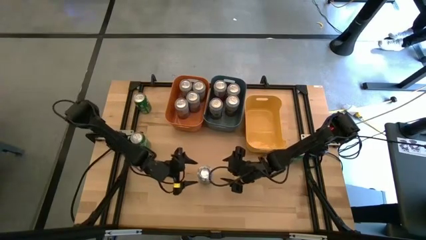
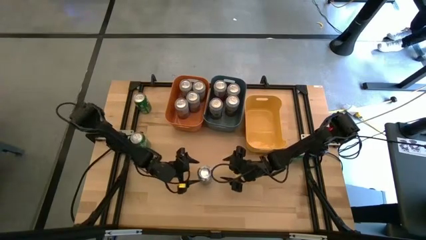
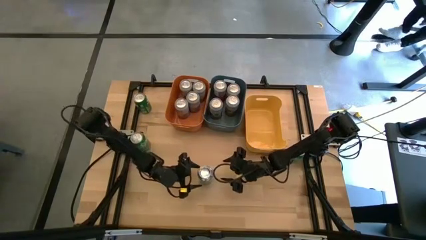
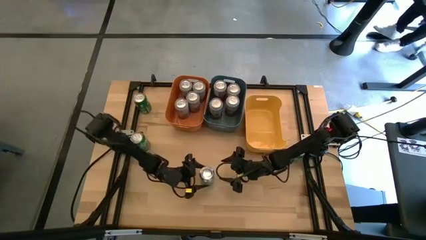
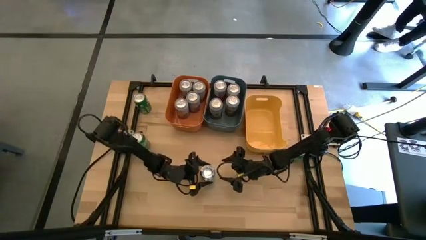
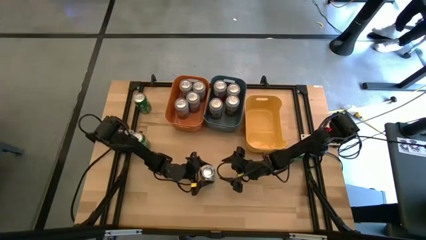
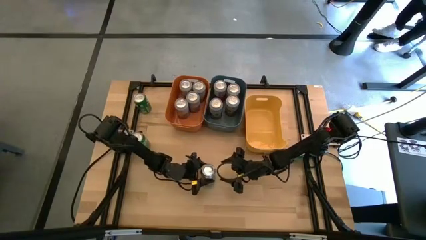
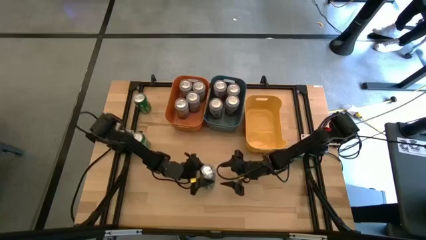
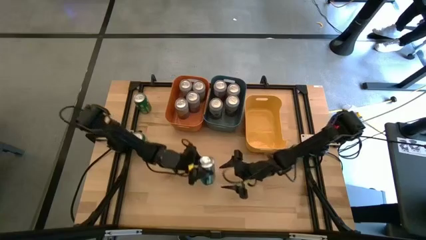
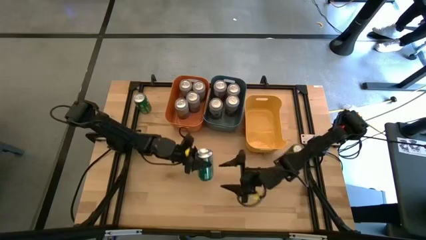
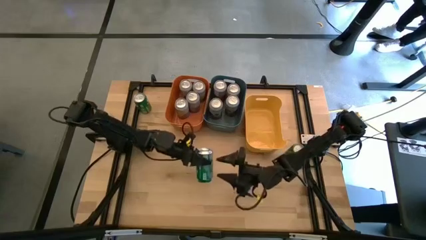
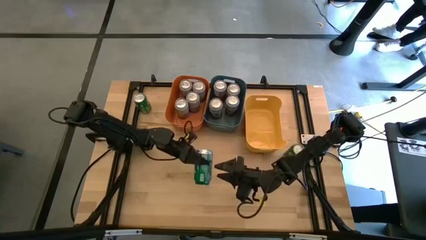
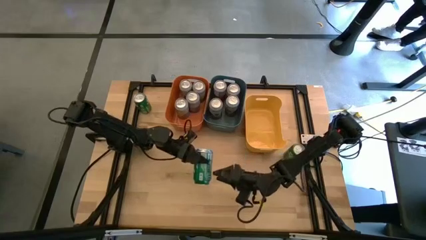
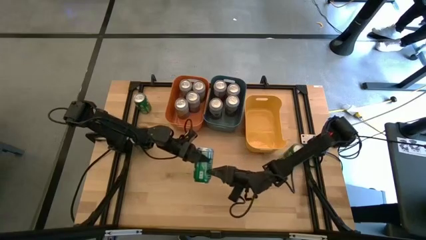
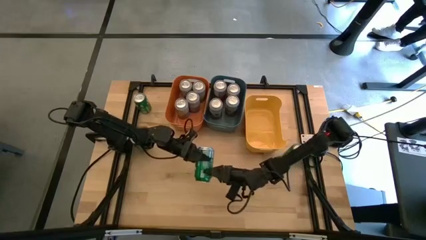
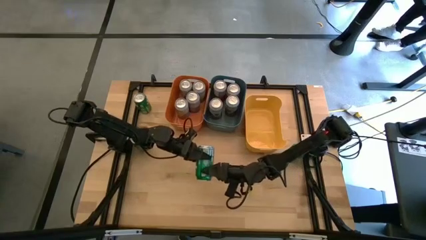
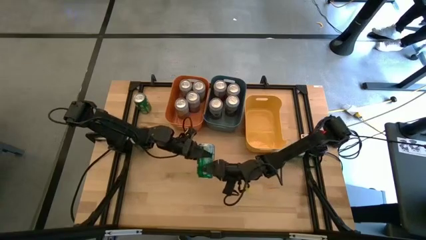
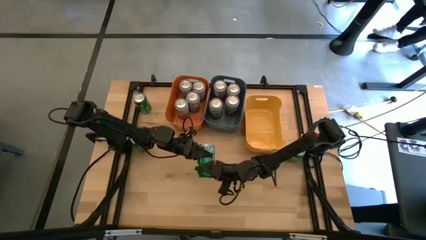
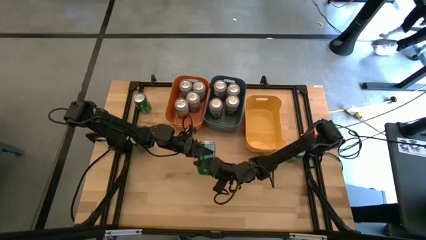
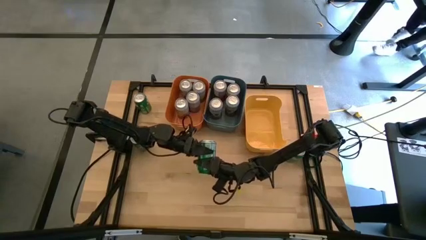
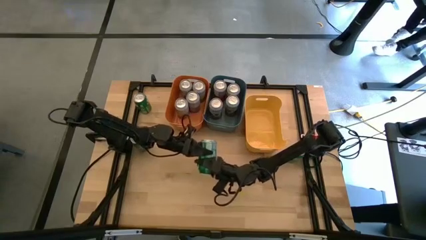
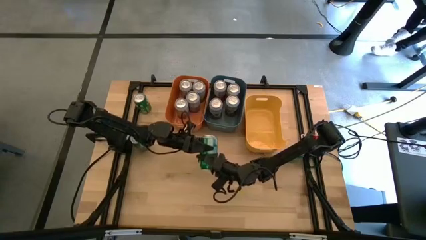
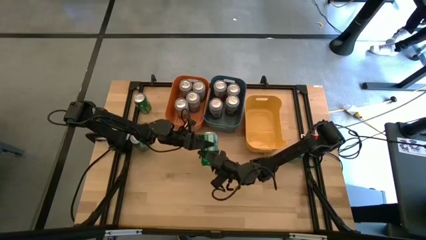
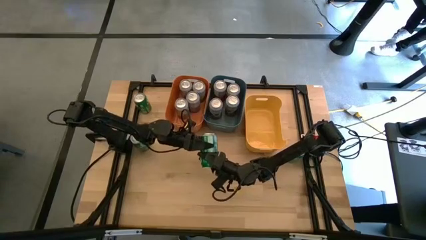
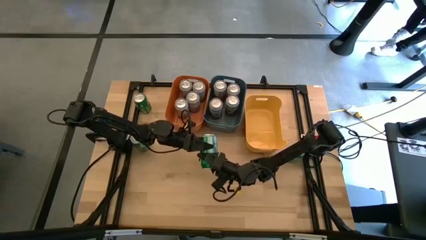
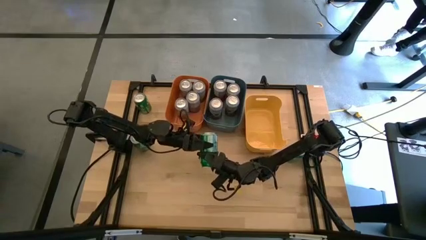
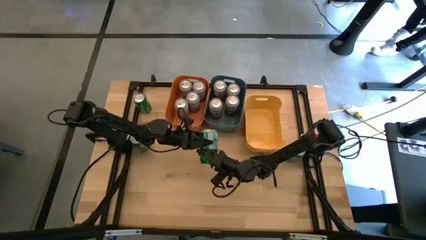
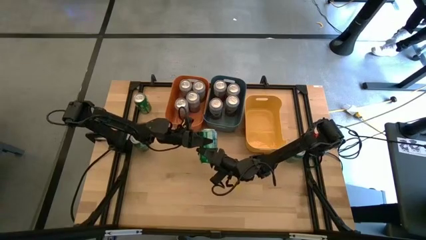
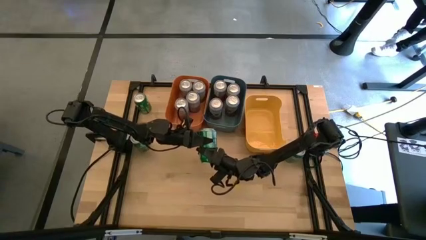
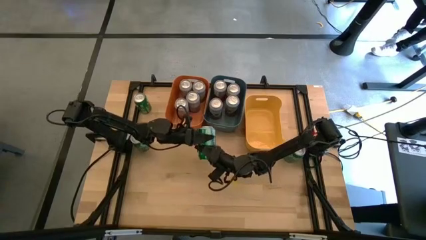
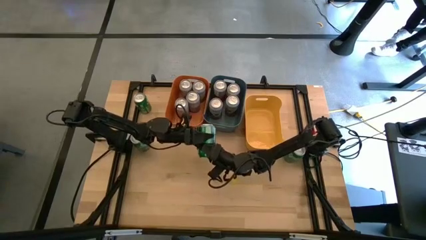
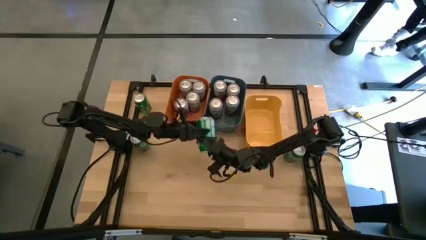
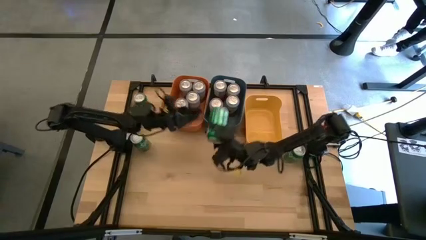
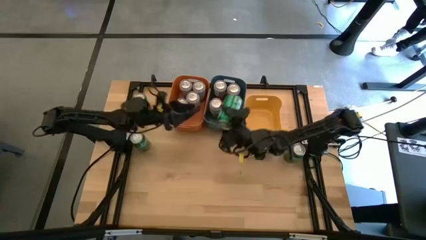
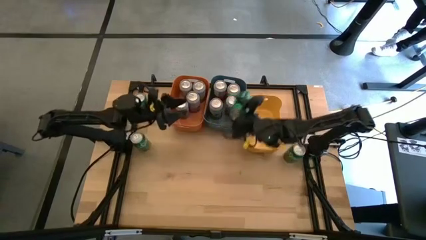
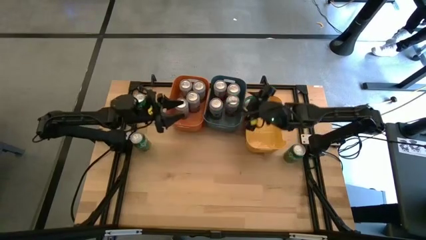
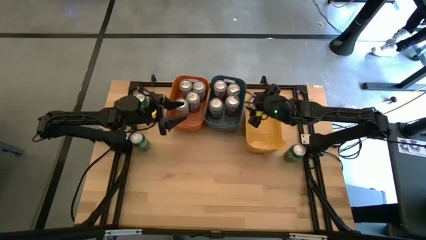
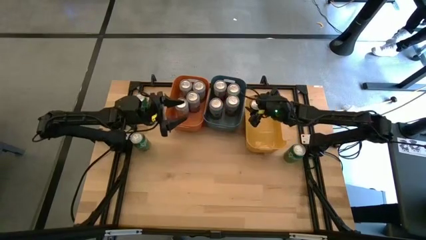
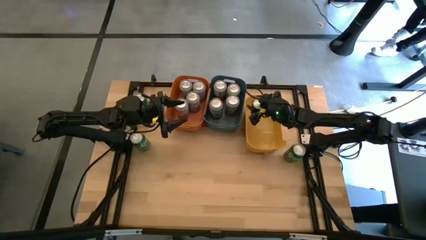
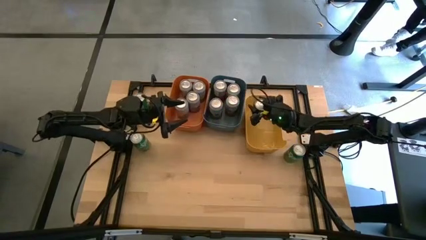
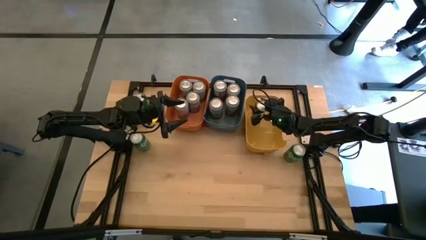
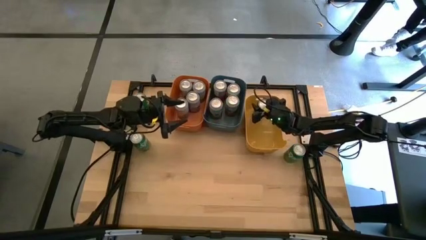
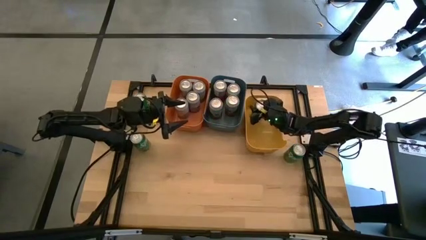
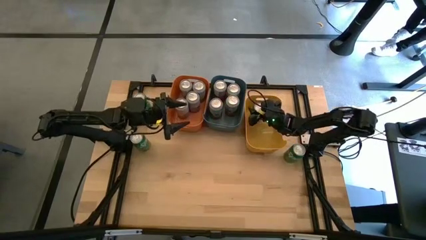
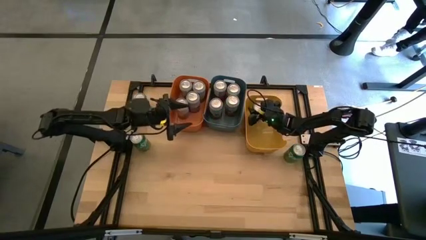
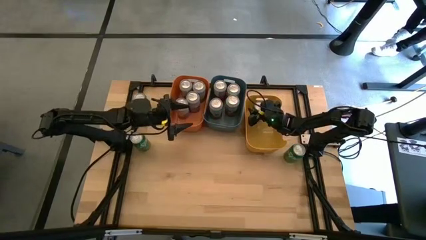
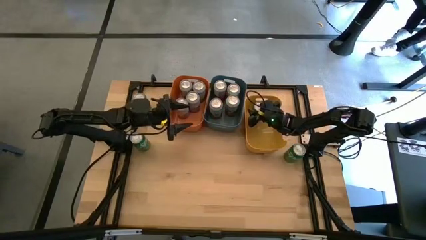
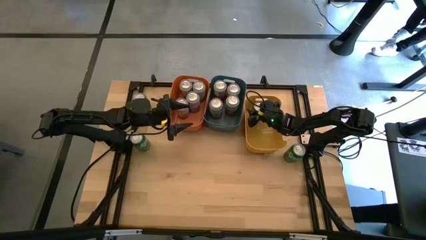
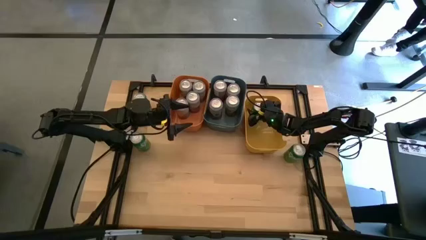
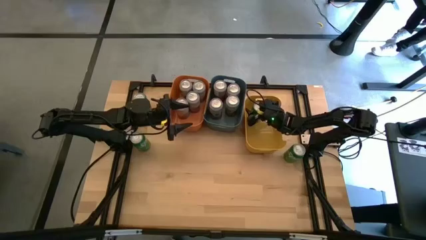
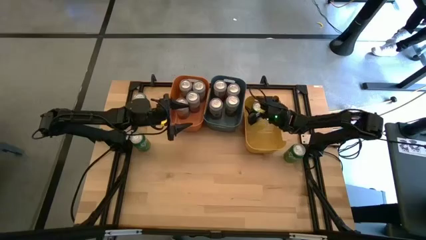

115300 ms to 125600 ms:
Task: Sort soda cans
Put the top right green soda can into the yellow bin
